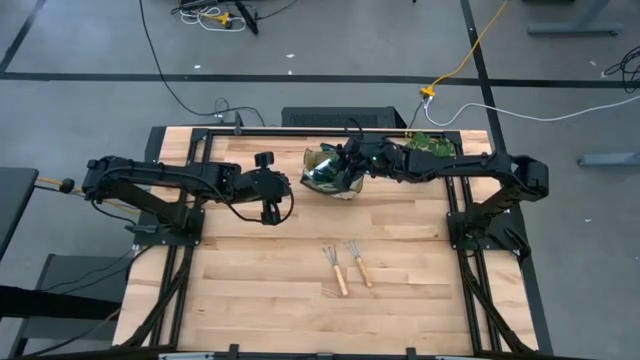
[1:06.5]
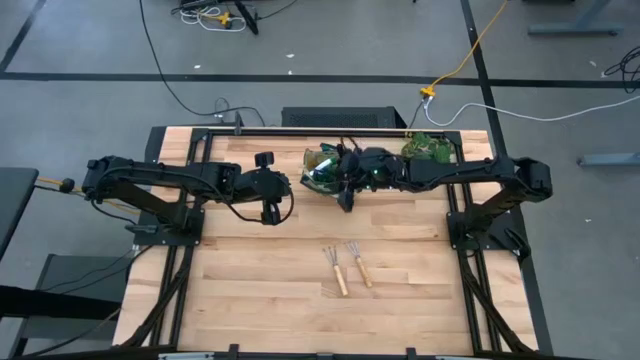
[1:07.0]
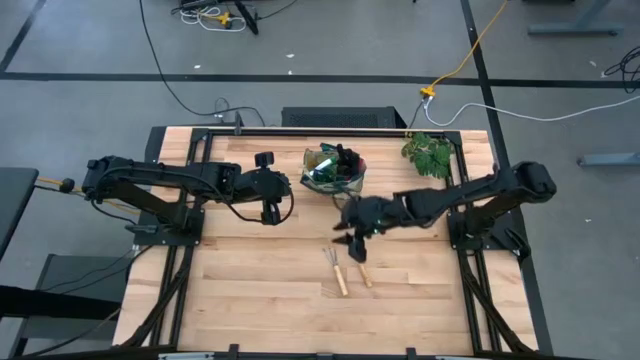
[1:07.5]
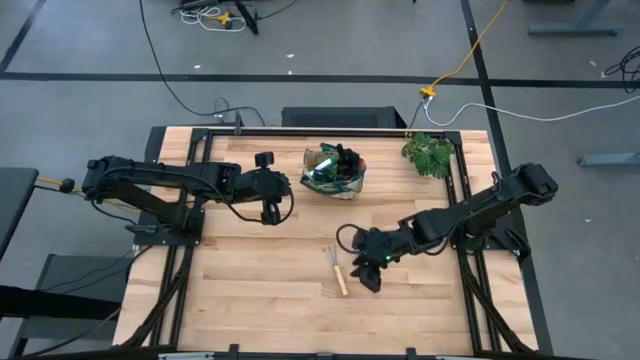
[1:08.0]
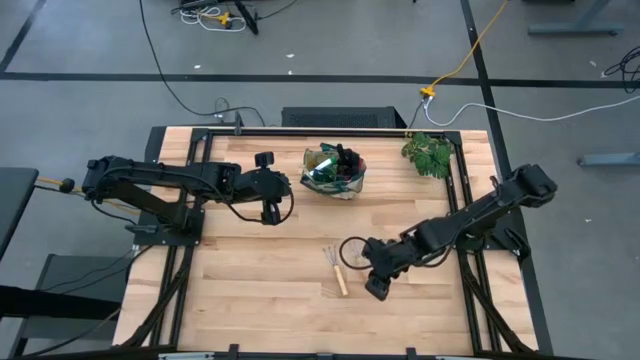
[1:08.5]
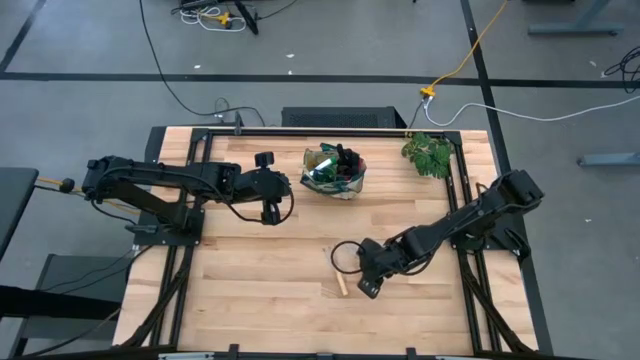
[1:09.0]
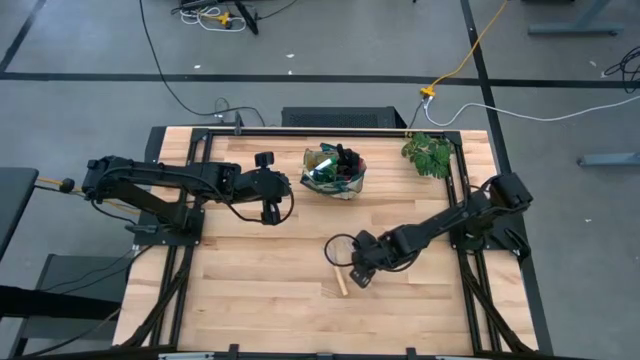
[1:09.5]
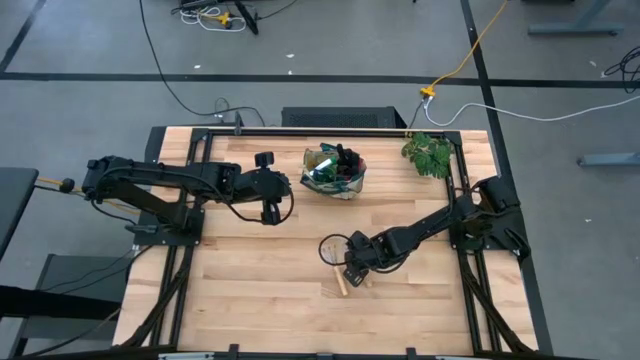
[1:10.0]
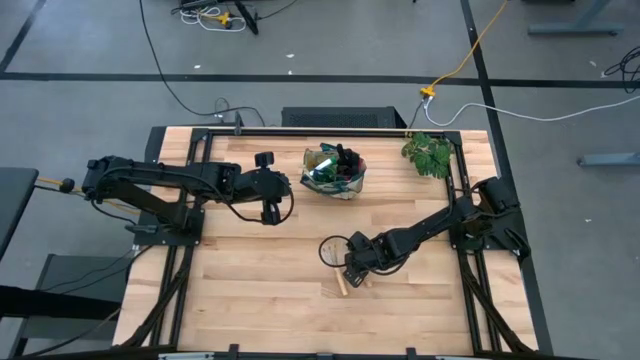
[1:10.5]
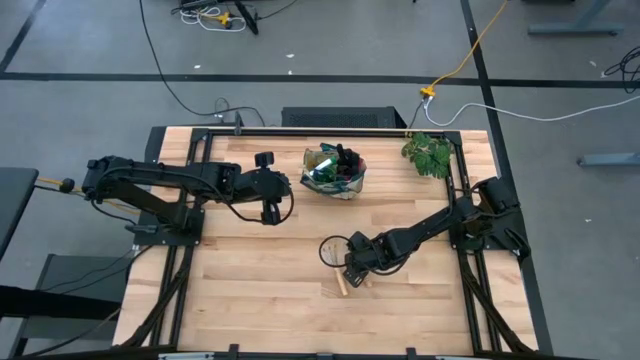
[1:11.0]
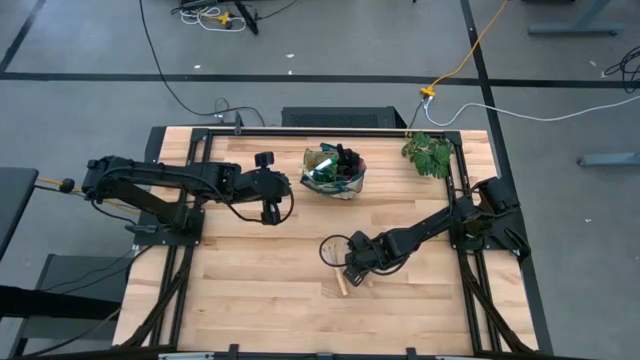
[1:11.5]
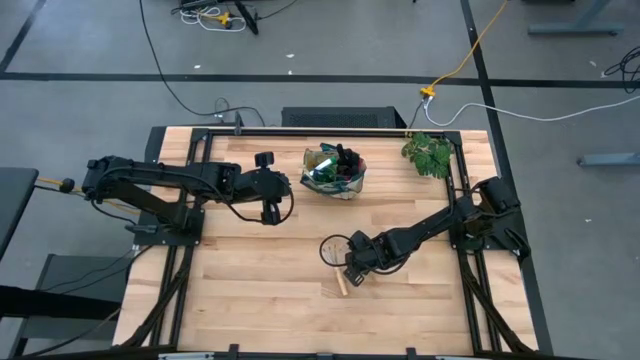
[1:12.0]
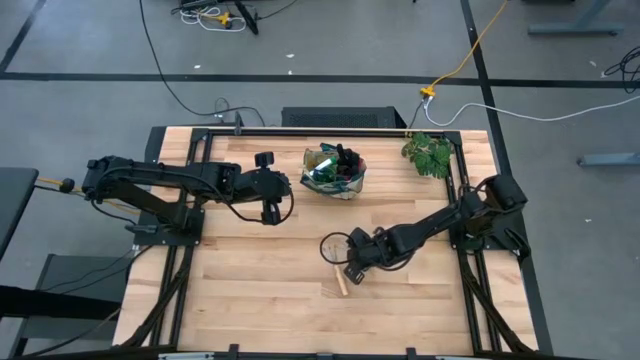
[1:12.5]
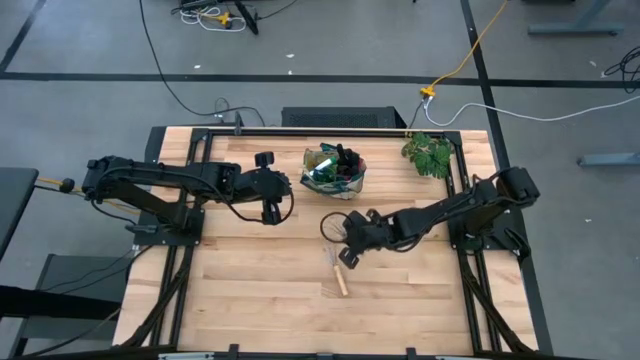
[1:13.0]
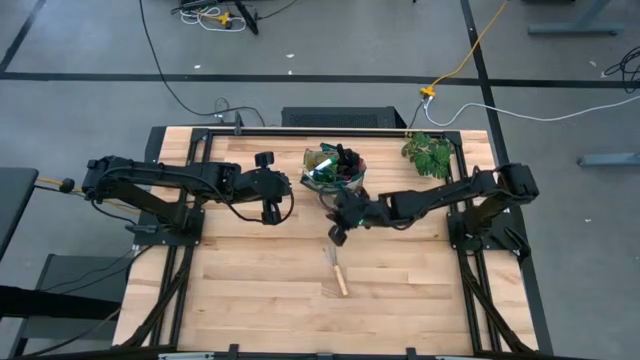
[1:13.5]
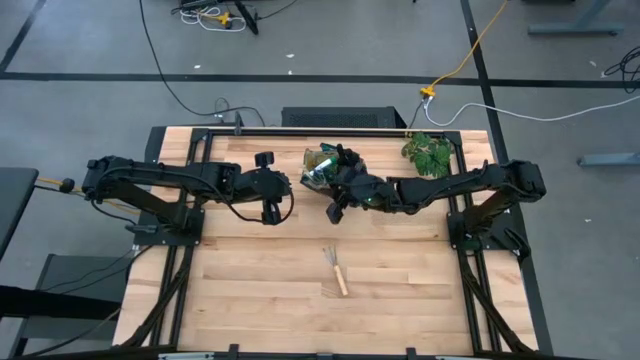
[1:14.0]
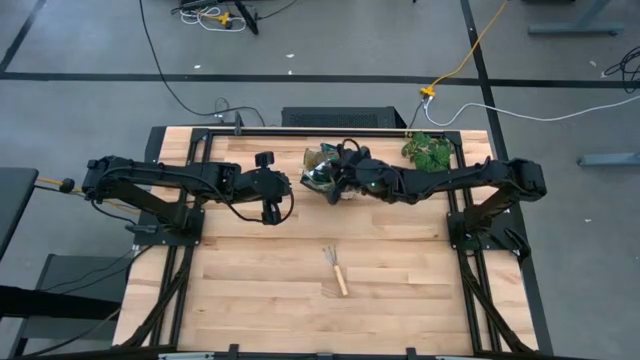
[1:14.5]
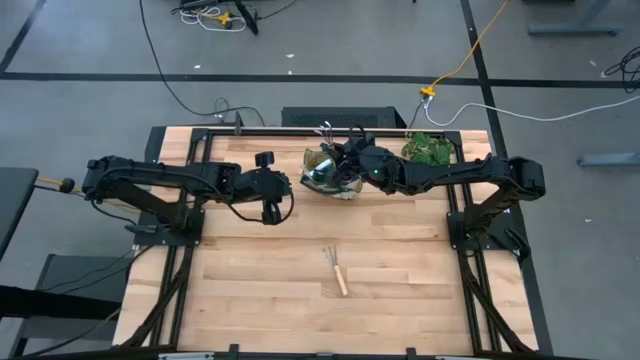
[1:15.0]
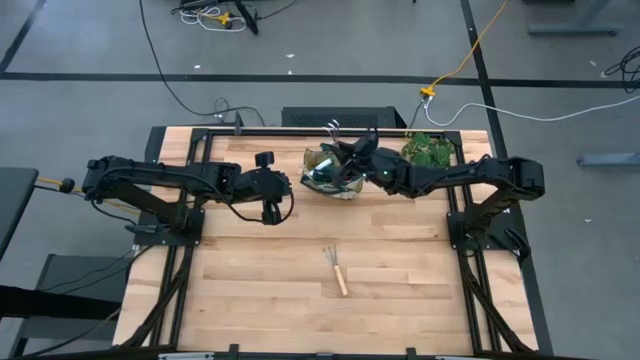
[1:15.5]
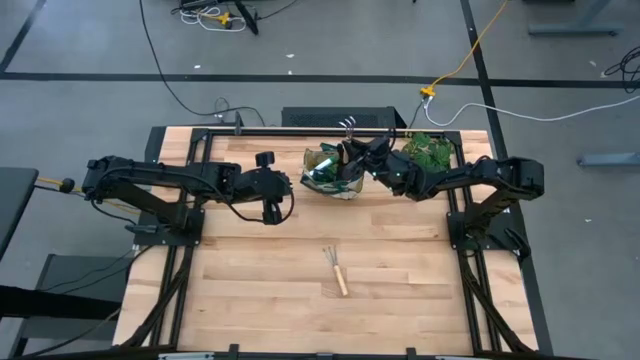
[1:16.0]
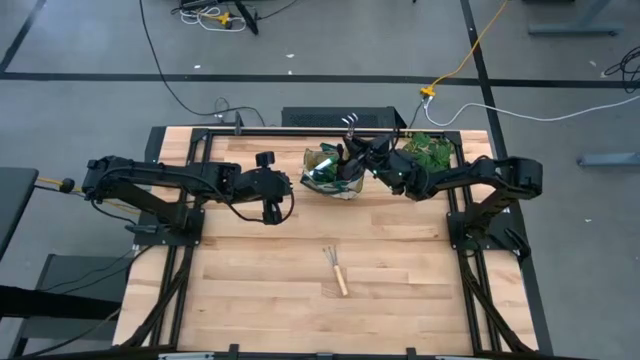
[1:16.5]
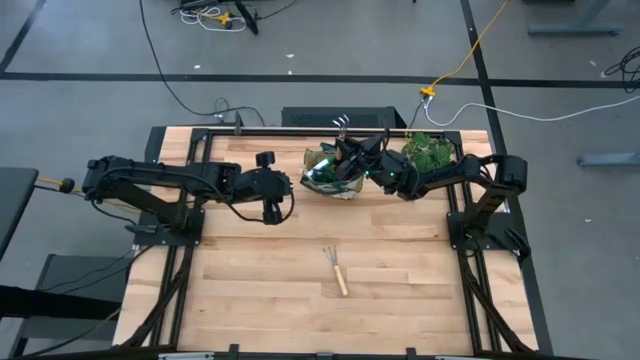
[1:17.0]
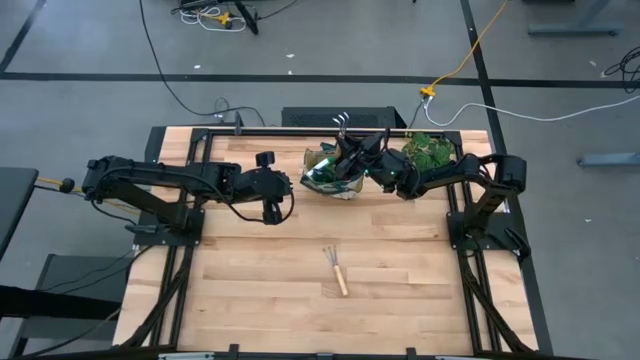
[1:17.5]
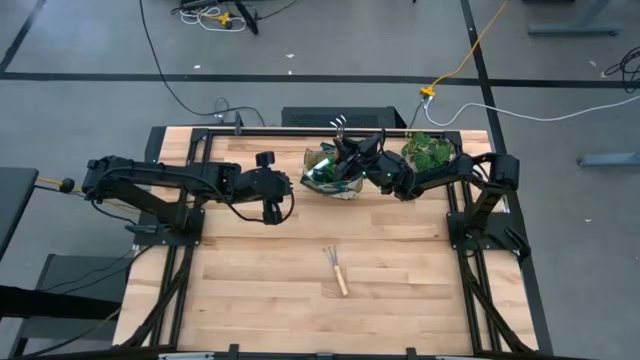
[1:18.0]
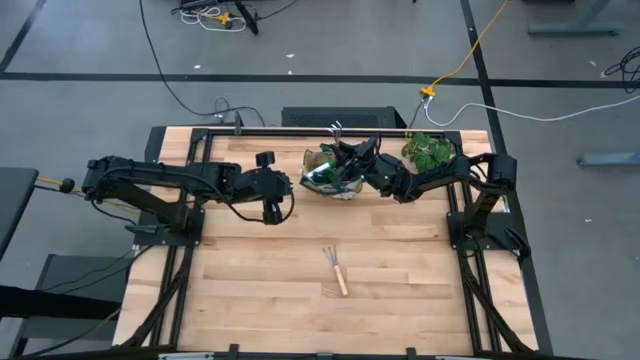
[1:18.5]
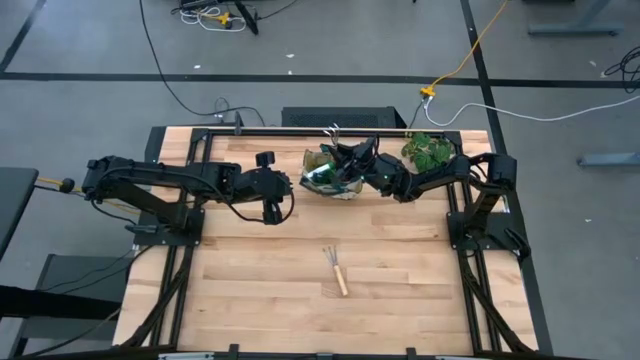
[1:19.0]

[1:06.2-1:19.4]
Task: Pick & Place Garden tools in Gardening bag
Put the right hand cultivator into the tool bag

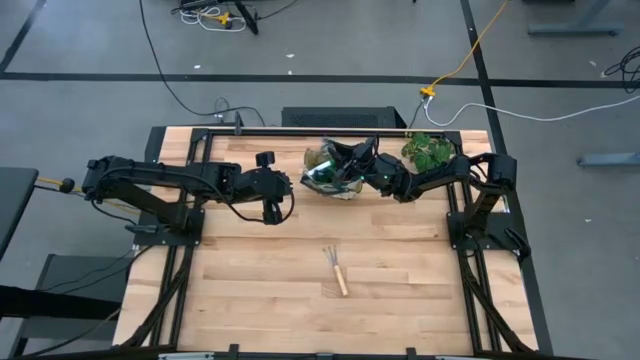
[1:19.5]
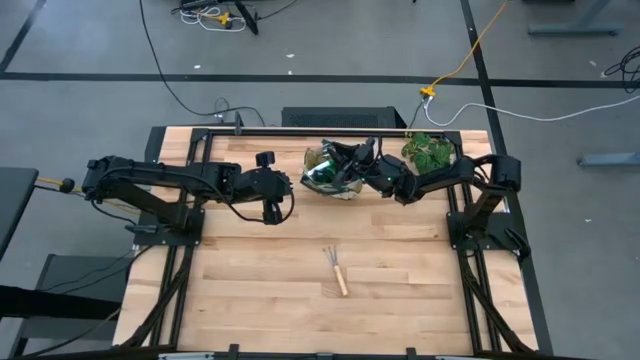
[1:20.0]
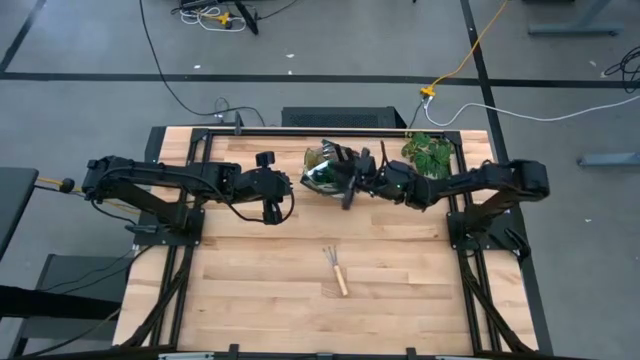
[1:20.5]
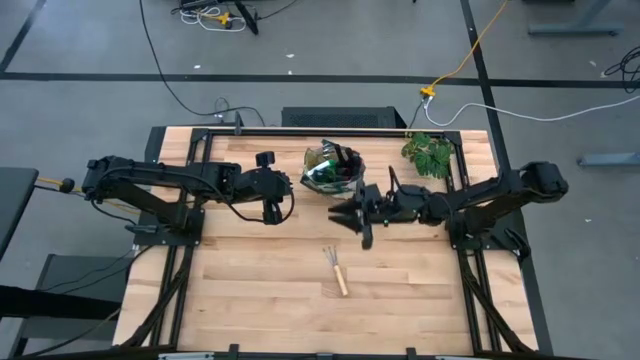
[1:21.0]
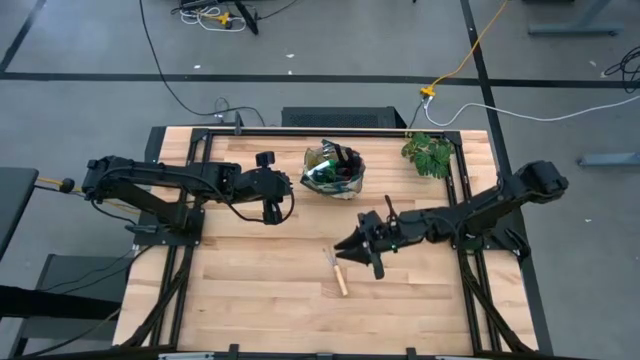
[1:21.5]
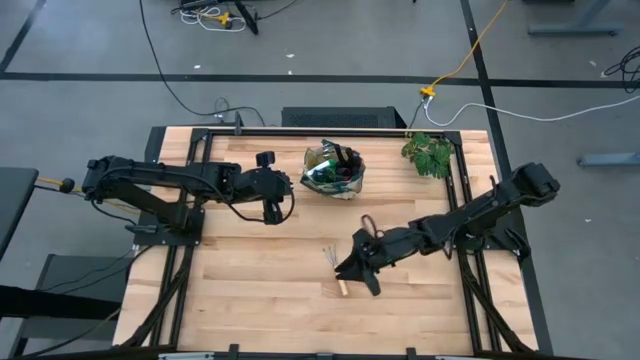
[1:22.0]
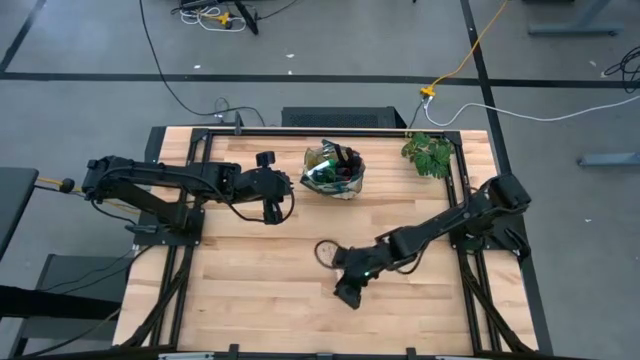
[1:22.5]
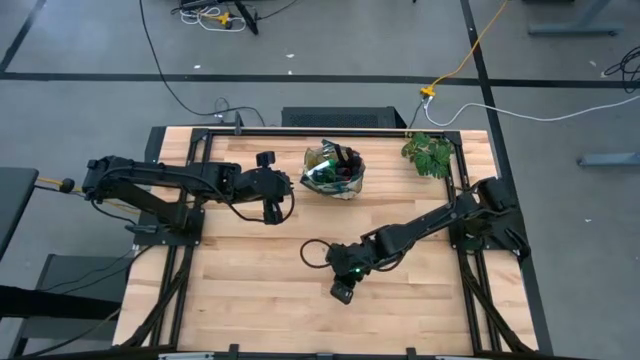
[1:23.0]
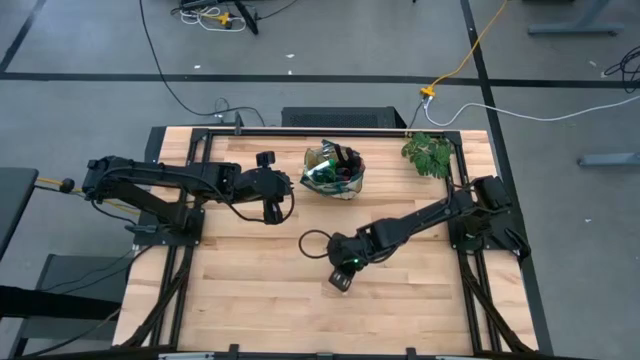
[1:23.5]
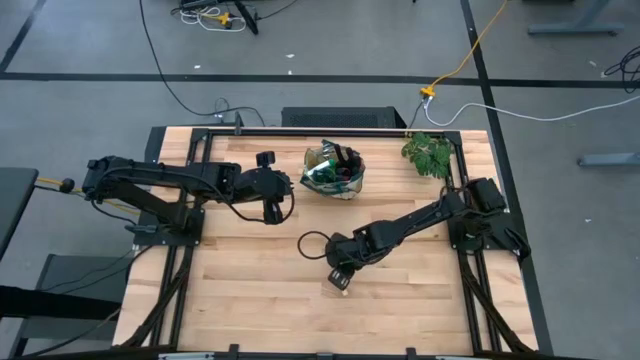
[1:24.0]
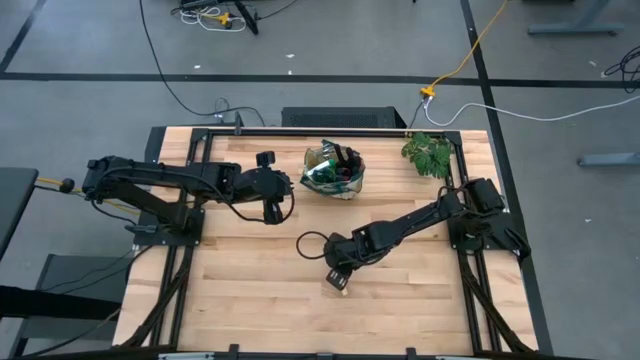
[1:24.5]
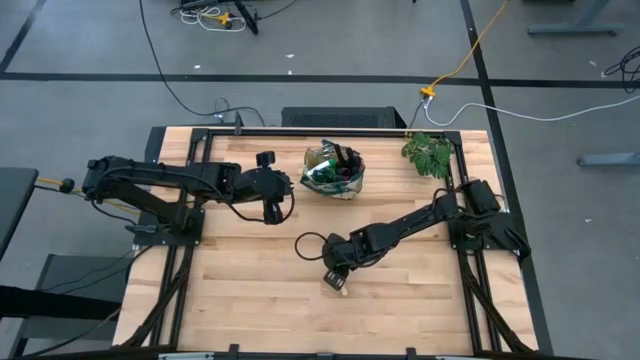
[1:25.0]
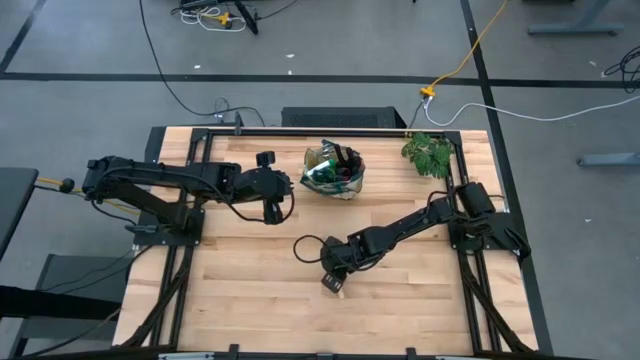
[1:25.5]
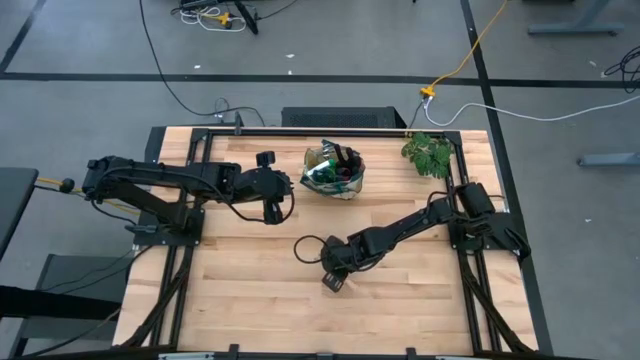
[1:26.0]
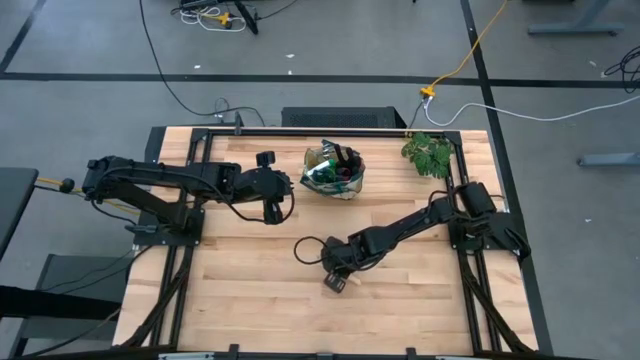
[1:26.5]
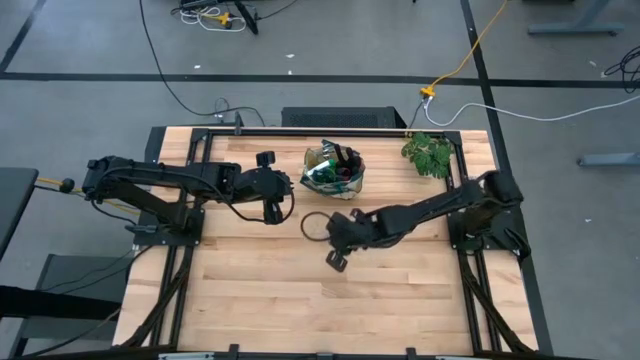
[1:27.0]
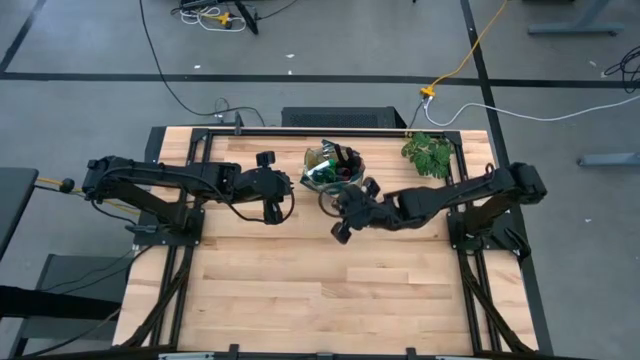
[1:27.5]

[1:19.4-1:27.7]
Put the hand cultivator into the tool bag
